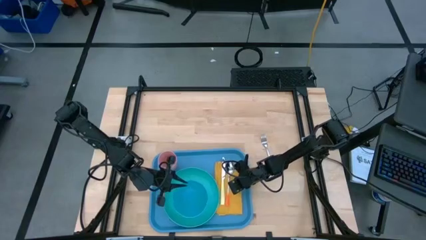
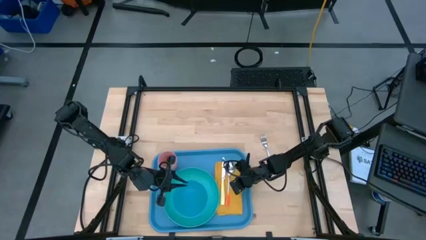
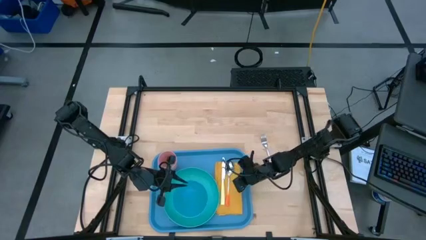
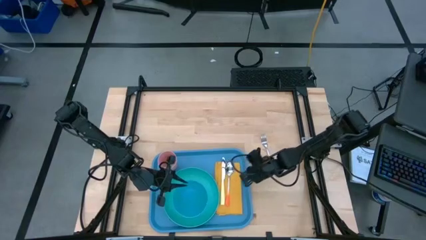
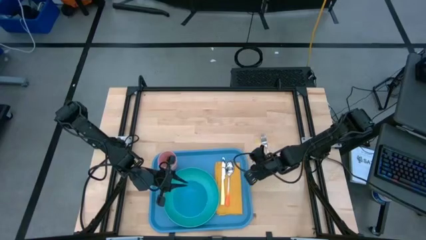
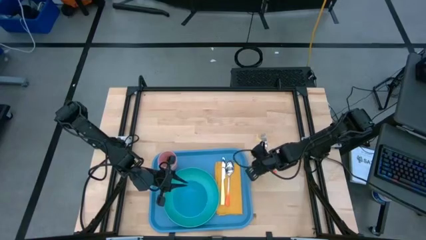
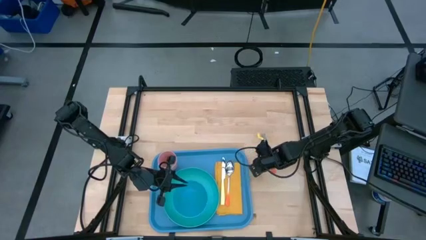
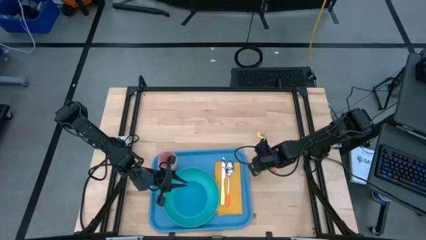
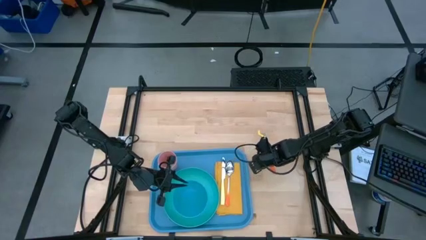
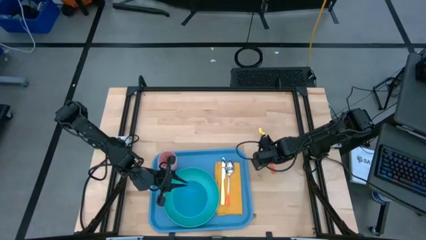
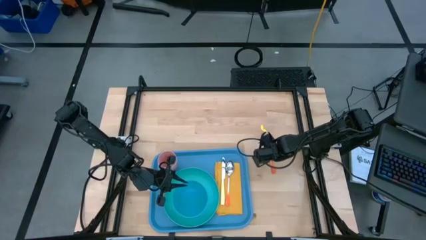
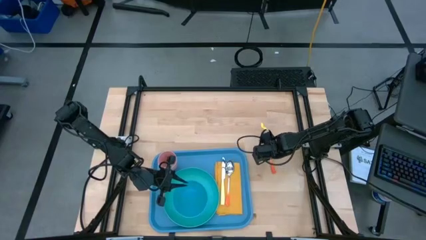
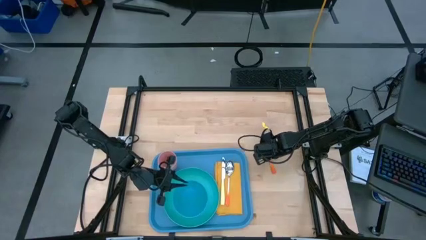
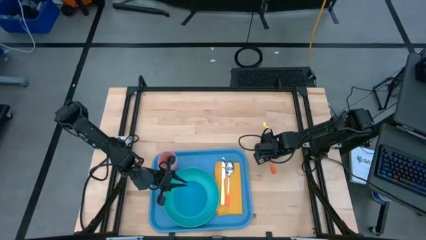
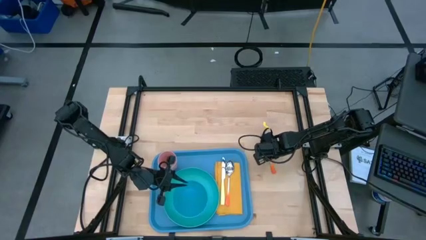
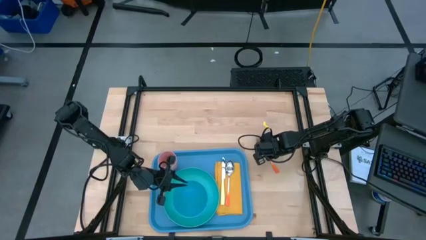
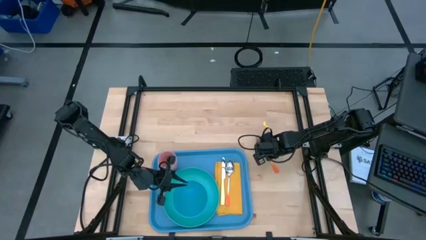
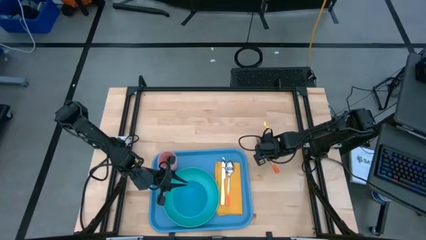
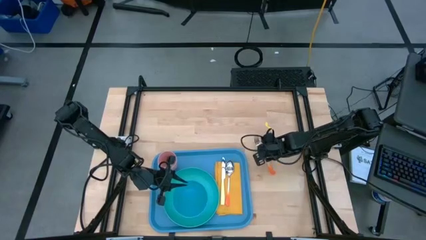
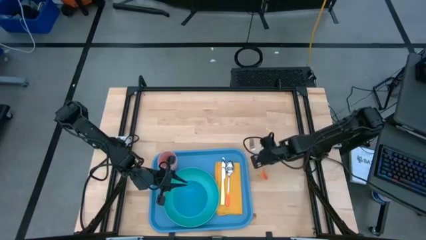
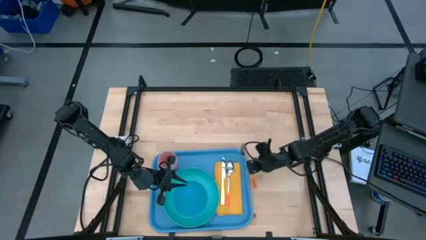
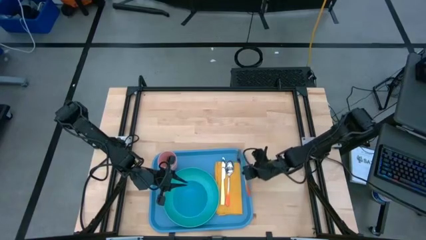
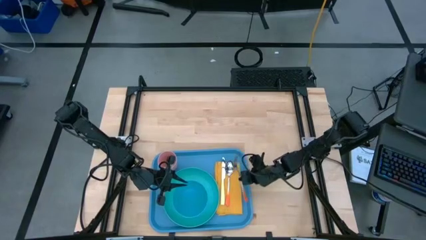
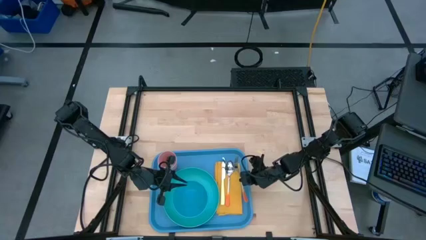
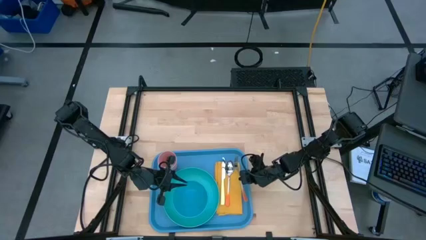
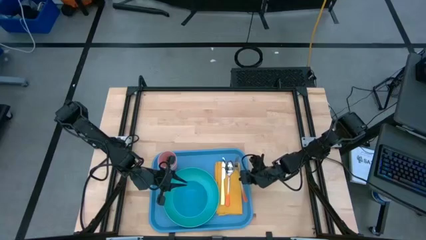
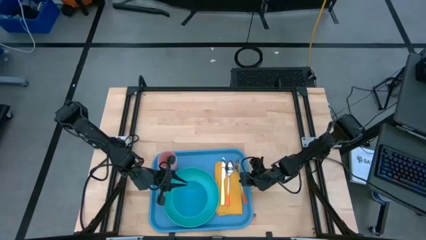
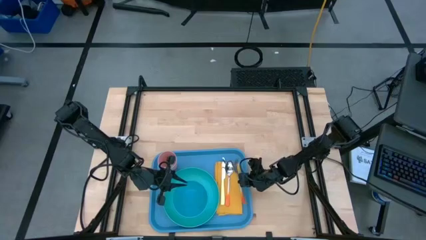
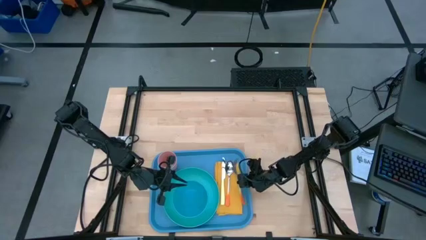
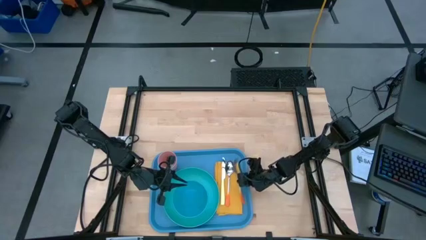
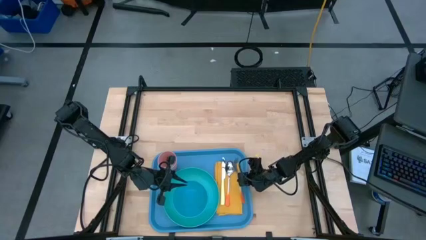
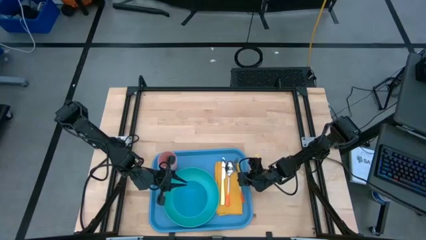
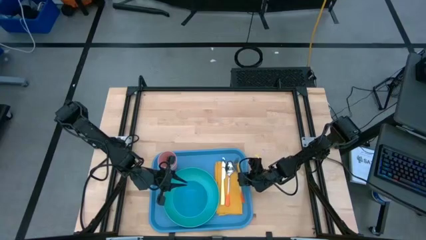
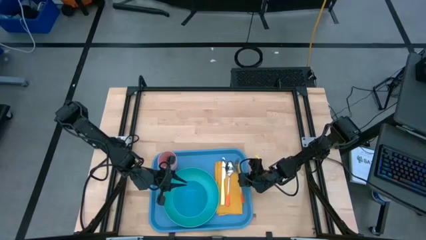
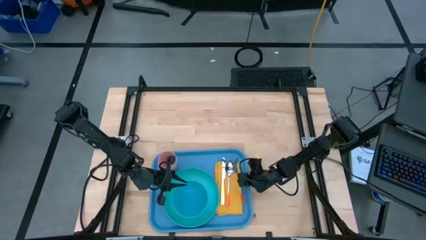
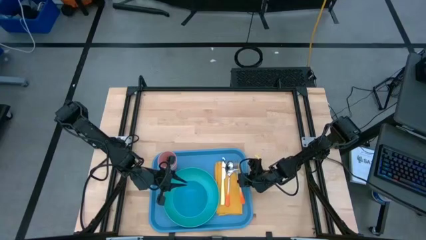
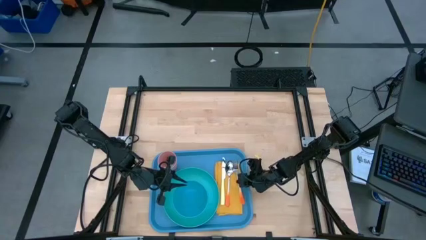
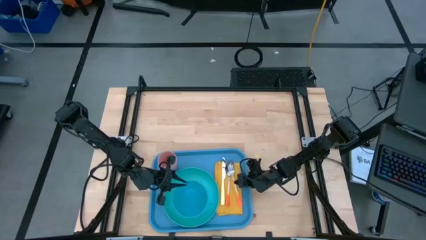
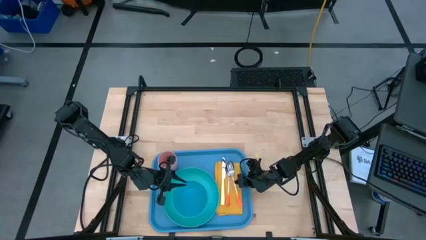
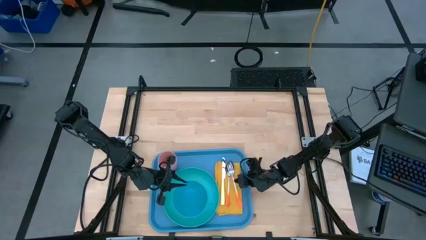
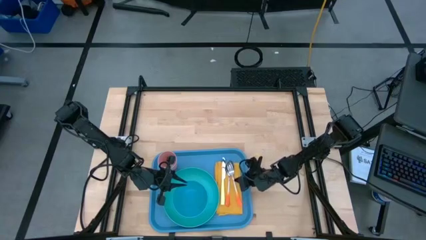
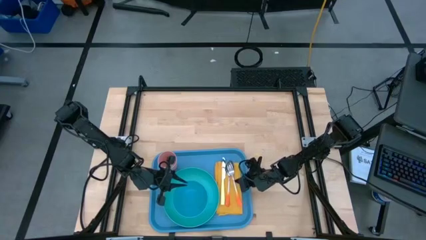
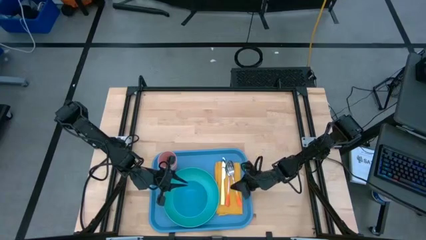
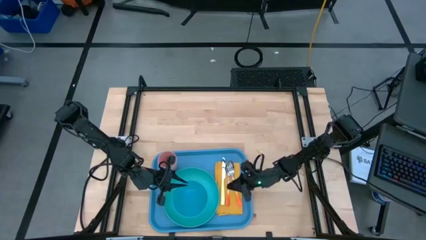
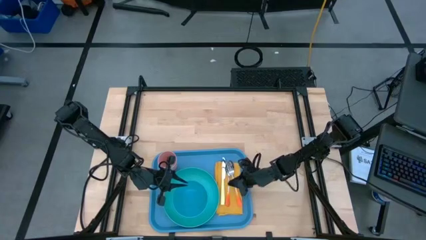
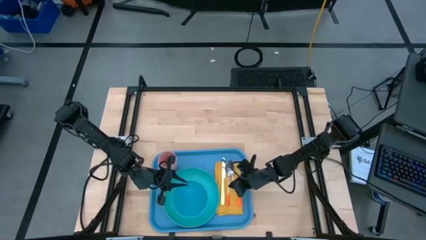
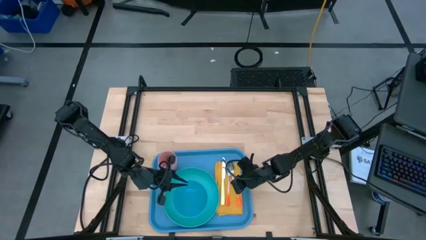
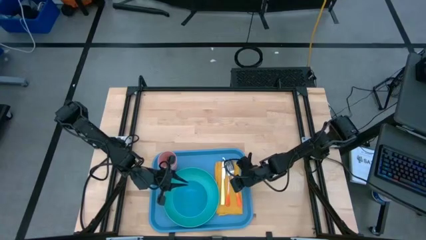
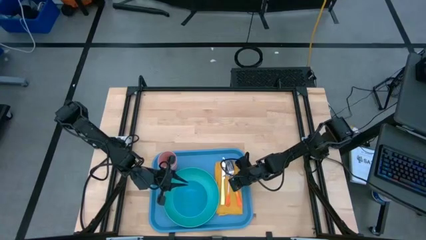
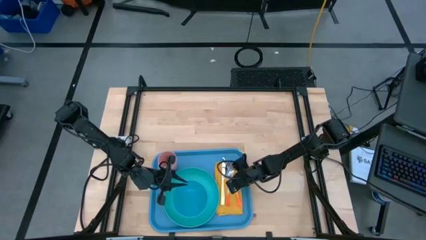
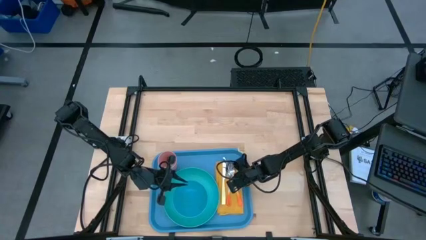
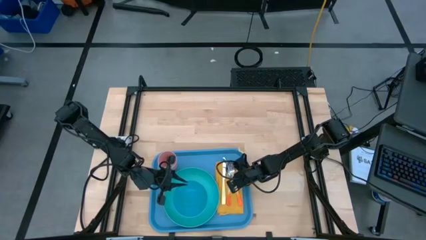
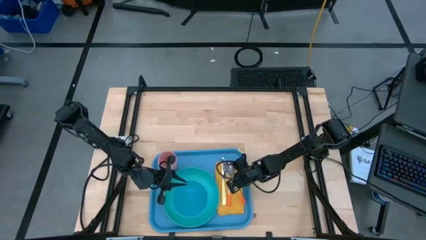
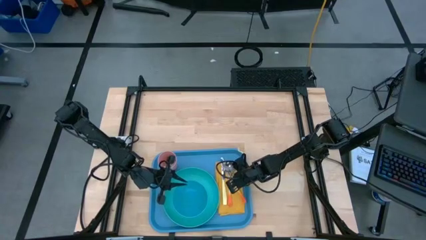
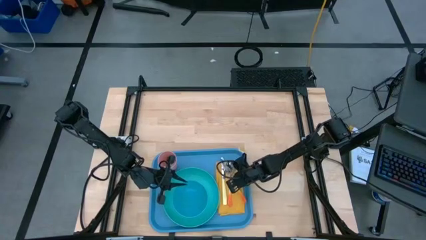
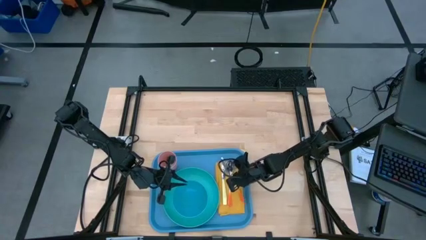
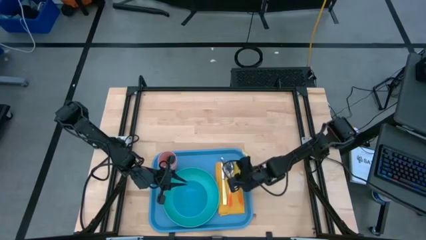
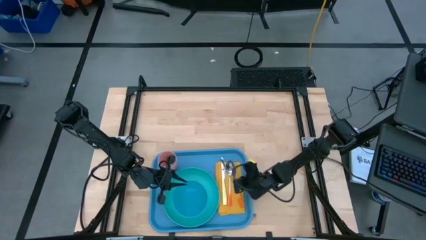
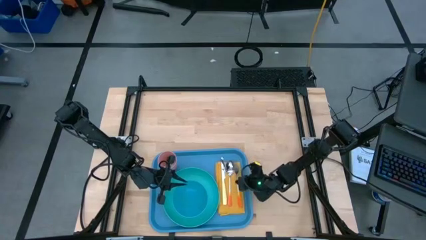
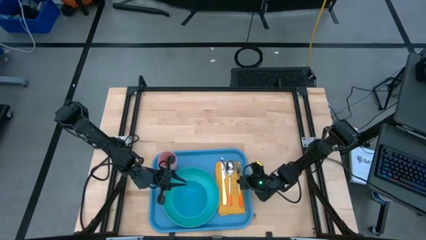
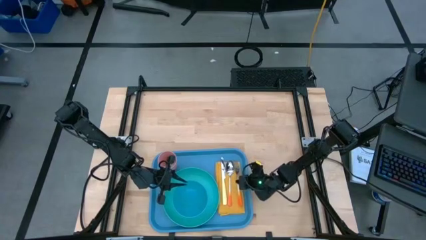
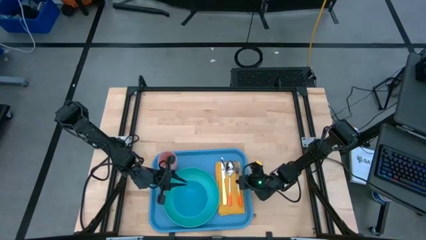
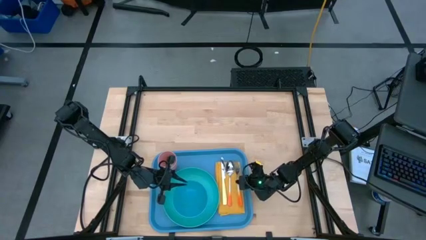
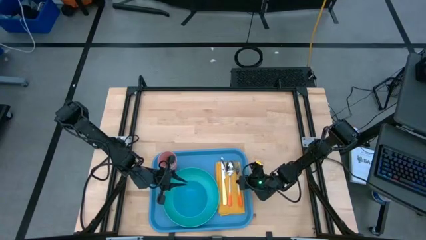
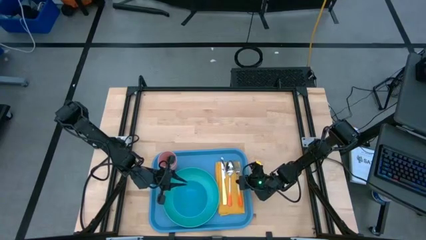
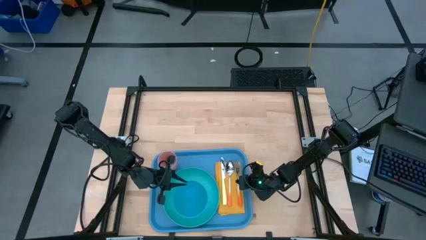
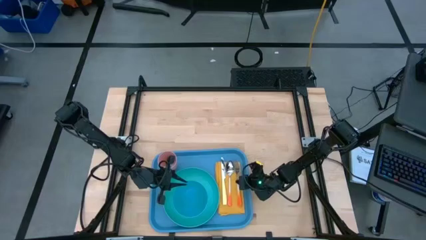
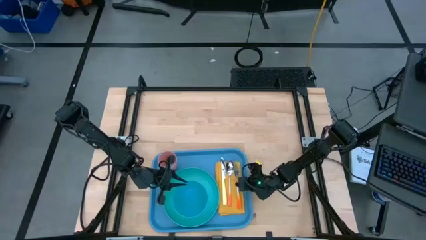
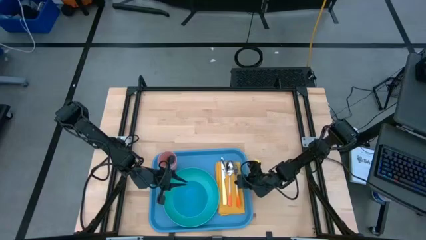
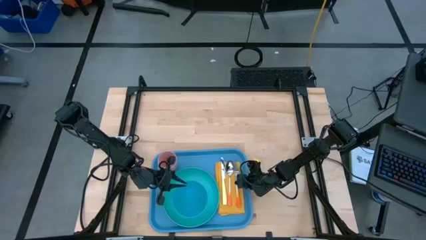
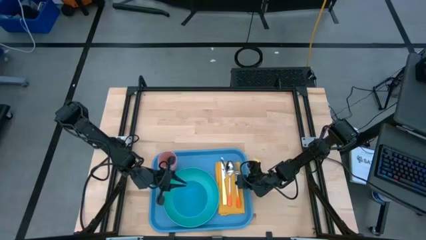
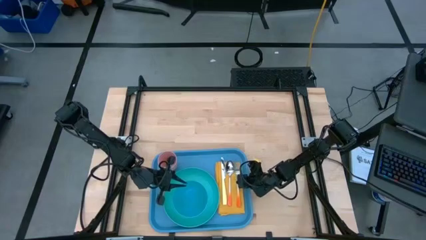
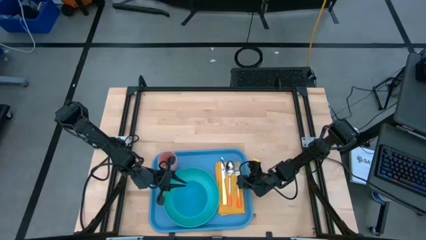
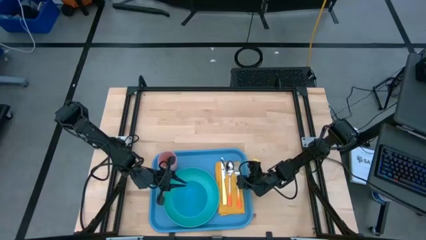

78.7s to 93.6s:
Task: Set up tray
Put the fork to the right of the spoon on the napkin

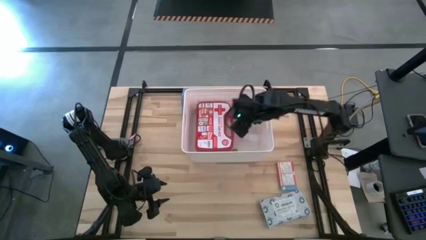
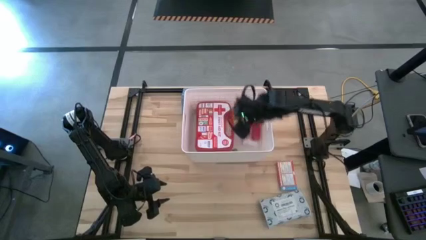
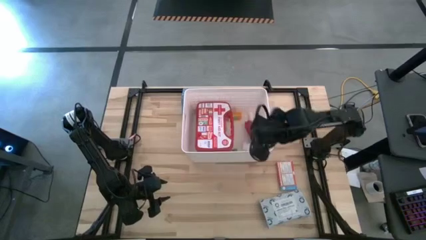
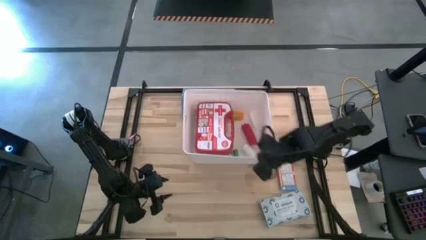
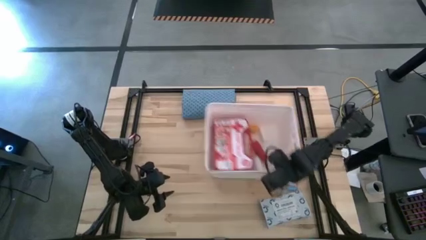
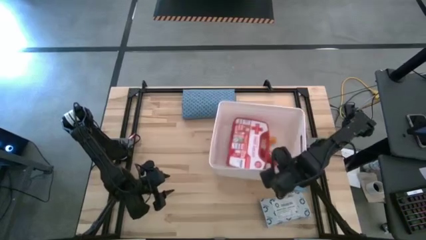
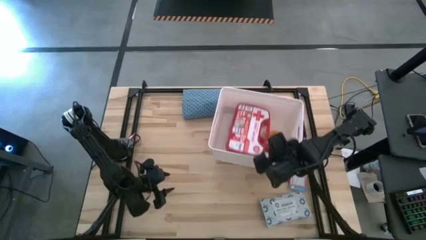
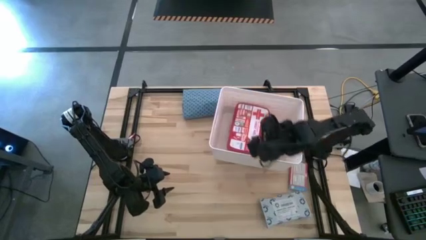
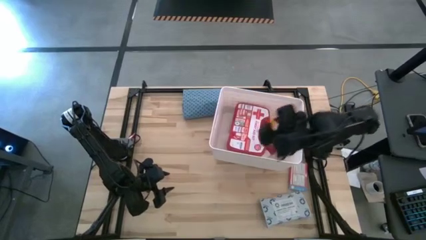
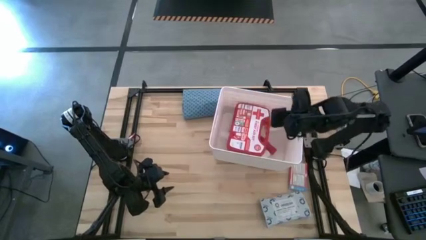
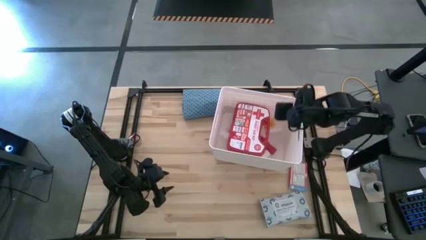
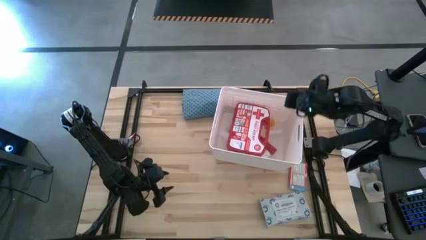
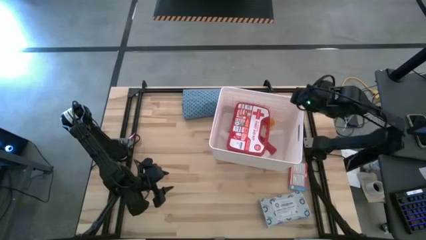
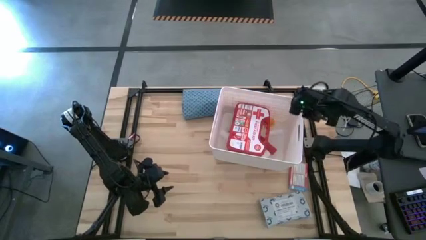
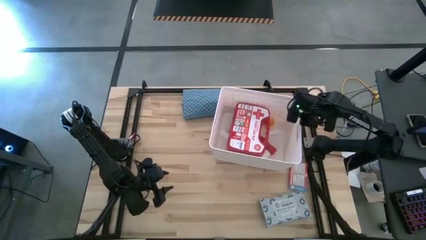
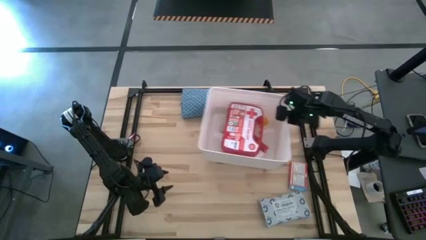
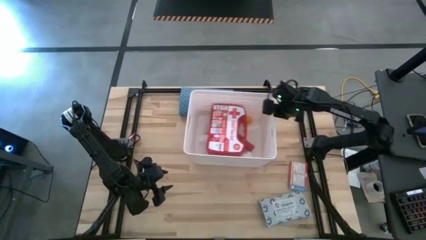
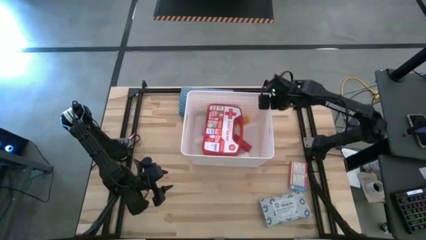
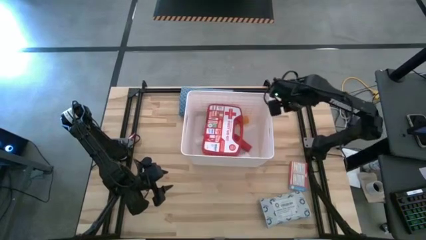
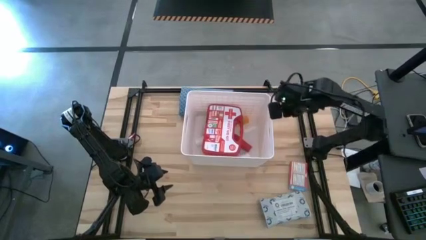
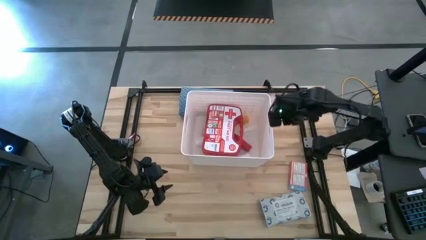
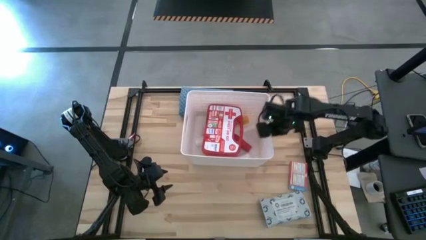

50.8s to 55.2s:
Task: Pick & place medical supplies in basket/bin
Adjust the white basket
